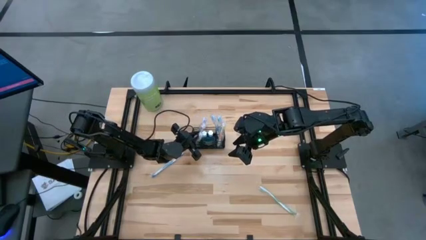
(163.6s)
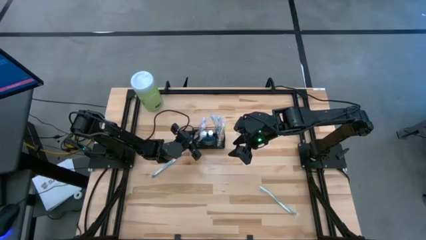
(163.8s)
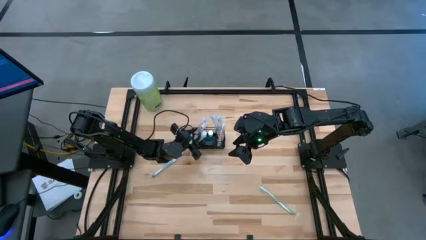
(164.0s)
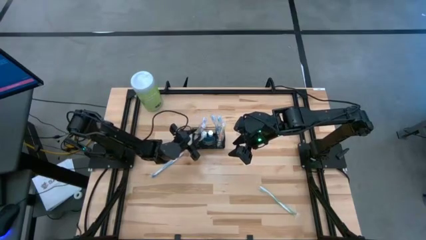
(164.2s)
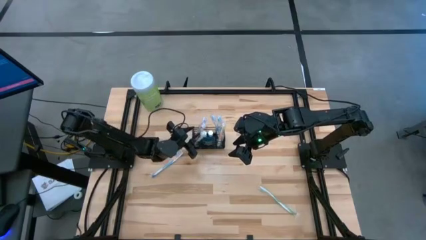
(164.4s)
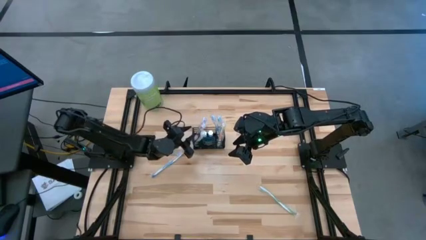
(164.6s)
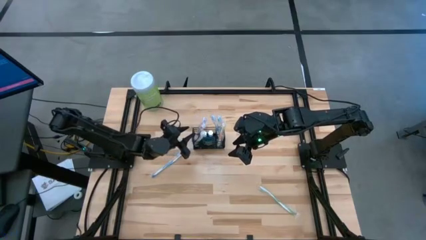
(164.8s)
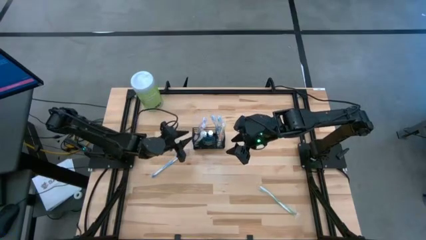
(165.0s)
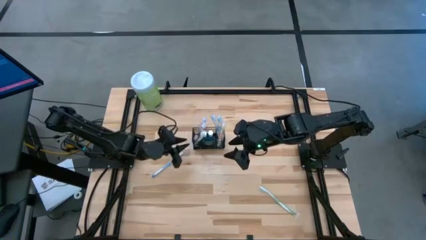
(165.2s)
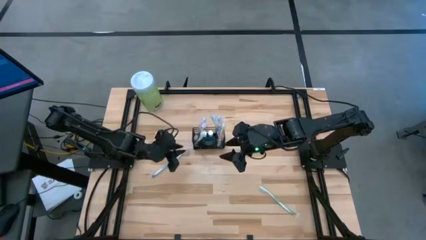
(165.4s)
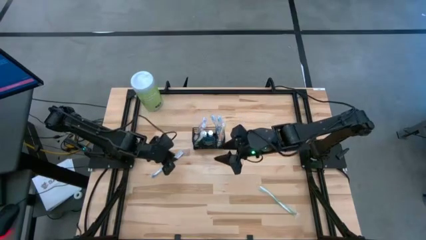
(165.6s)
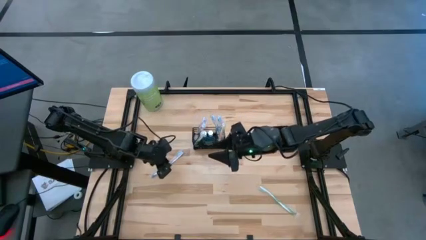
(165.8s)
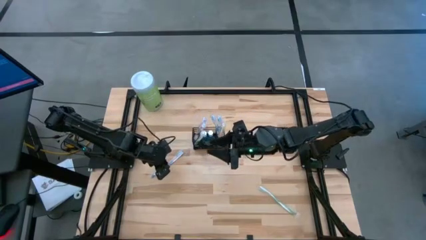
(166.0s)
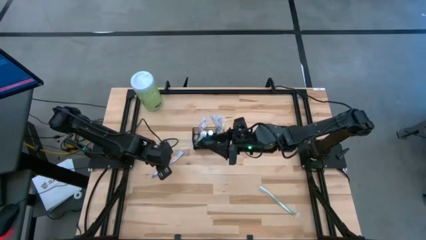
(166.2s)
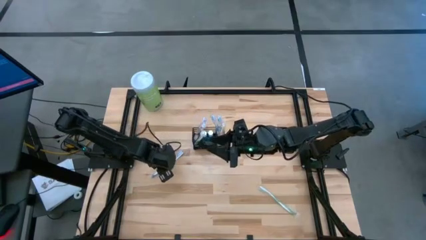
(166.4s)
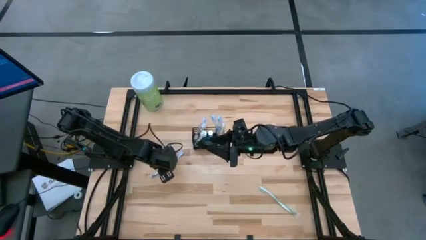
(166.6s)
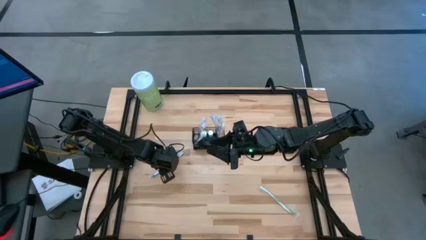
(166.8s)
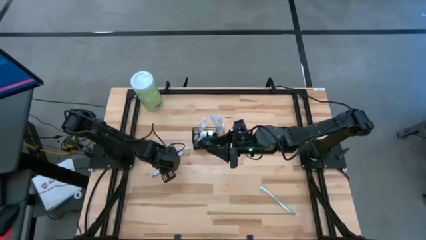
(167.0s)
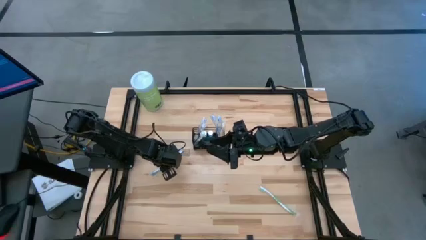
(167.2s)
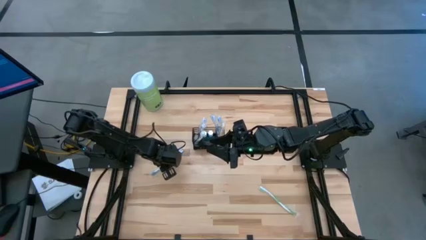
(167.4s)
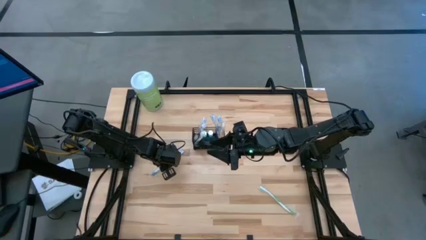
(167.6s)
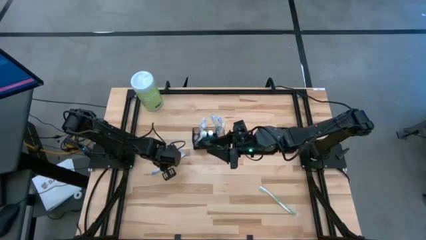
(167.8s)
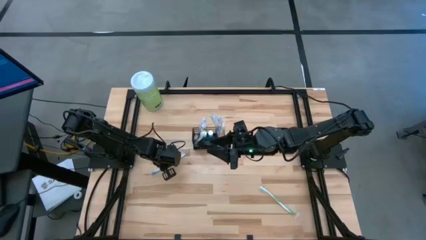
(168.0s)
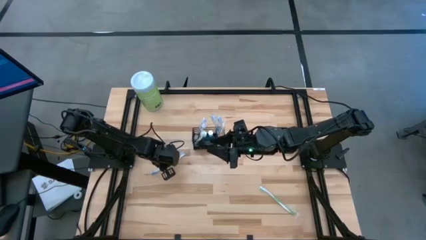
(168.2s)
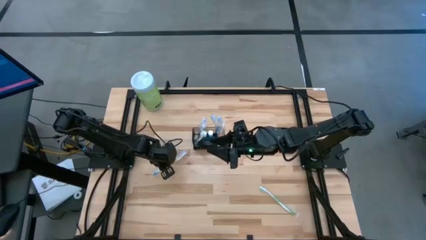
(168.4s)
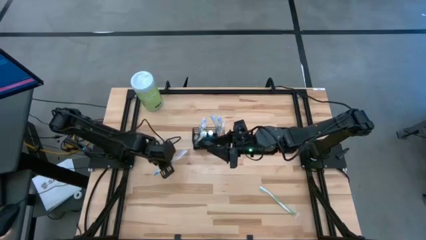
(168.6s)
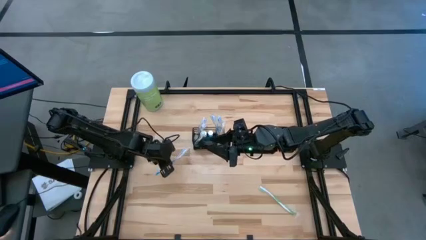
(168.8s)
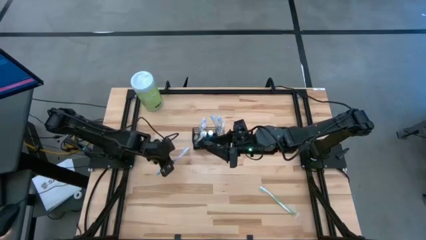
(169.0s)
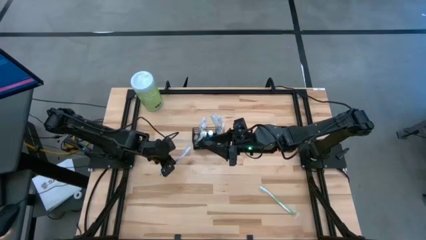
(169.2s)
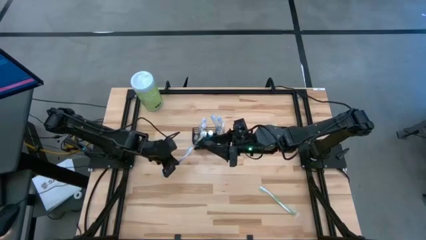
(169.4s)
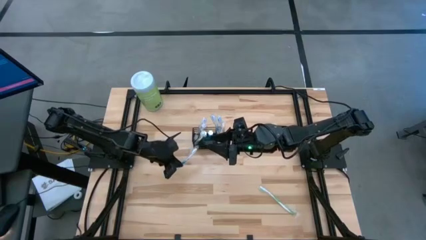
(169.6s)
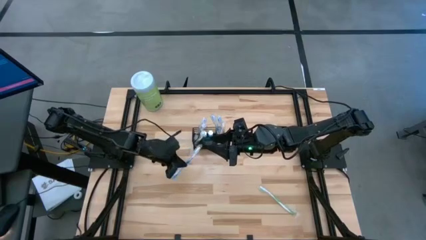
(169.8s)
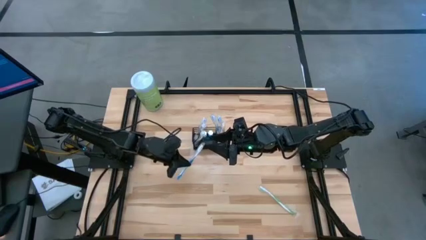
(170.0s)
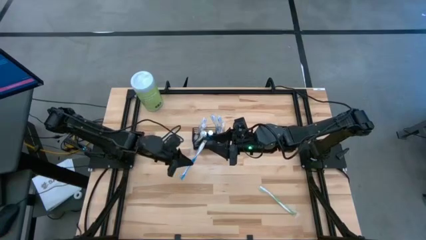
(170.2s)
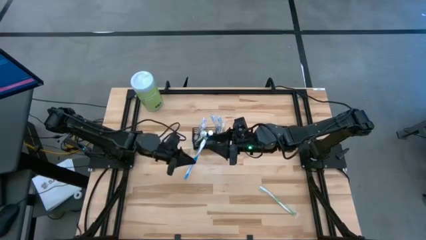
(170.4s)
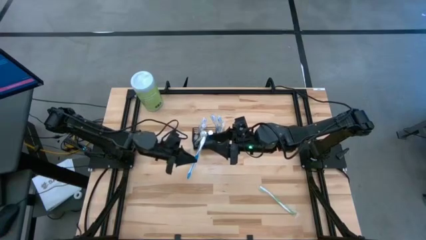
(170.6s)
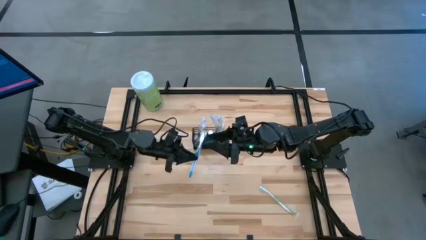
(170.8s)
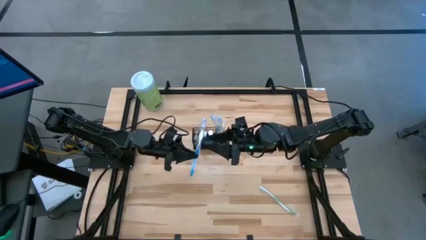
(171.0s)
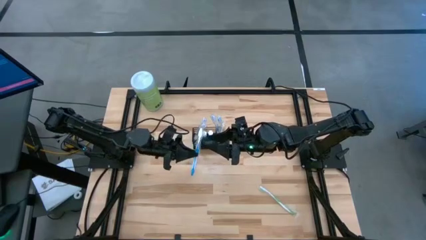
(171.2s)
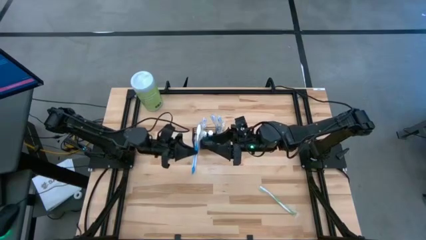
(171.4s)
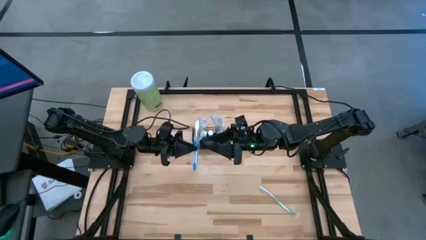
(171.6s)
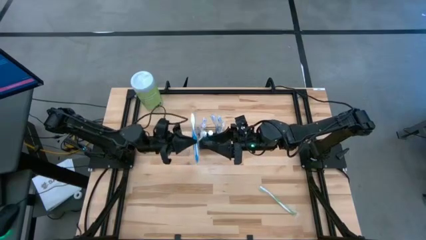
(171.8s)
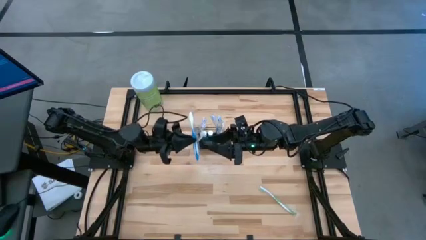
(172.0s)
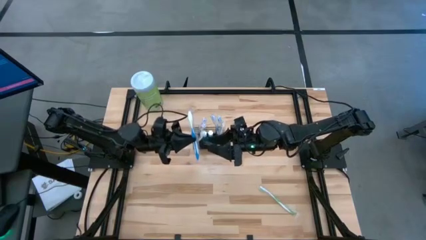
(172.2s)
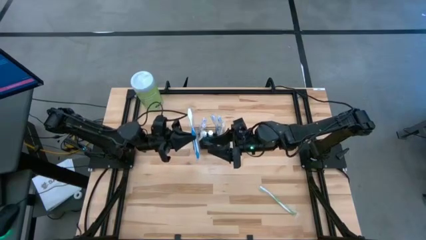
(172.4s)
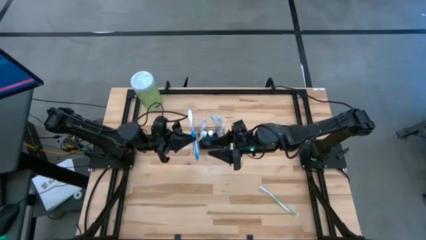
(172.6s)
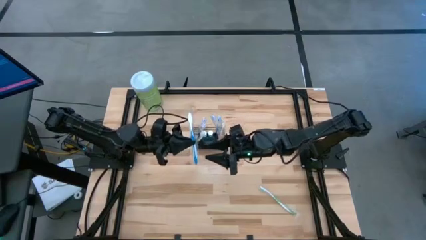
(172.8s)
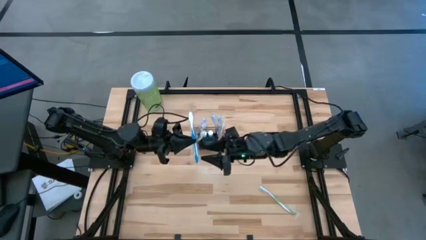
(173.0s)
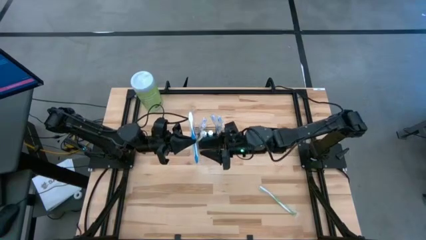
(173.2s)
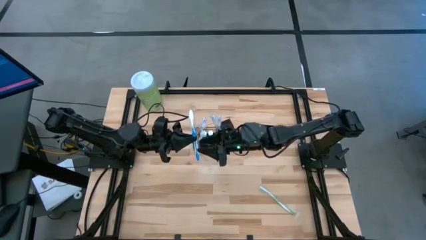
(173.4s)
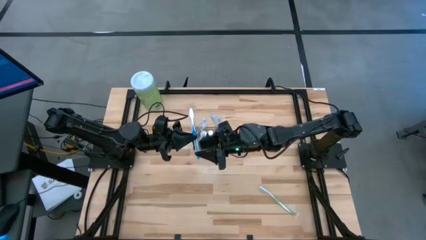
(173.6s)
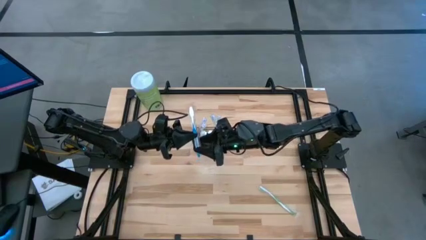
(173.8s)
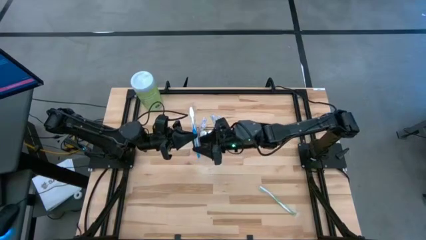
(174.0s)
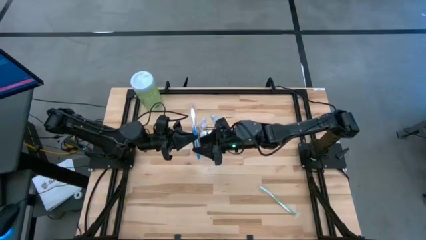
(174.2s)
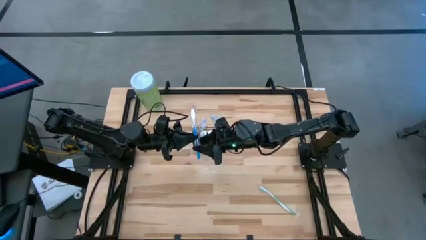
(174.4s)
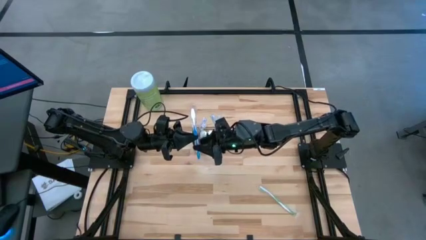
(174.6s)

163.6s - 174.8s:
Task: Pick & Place toothbrushing station
Put the blue toothbrush into the black mesh organizer

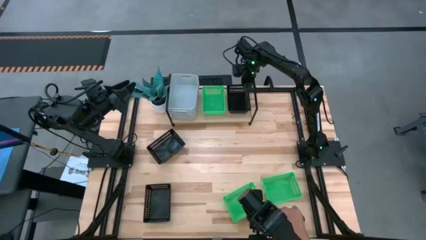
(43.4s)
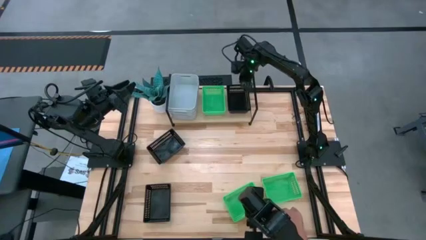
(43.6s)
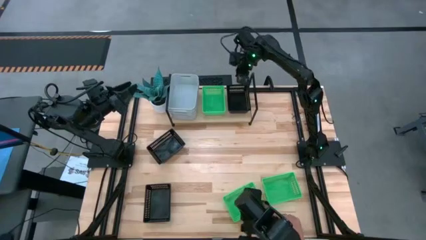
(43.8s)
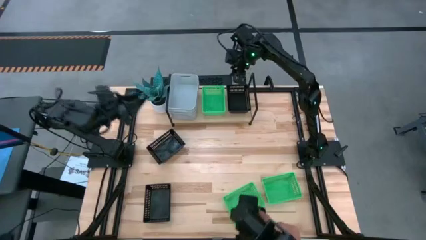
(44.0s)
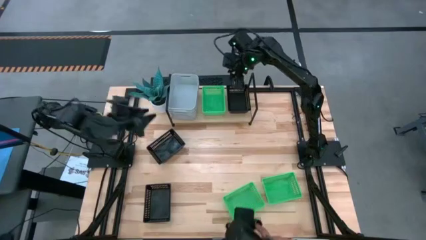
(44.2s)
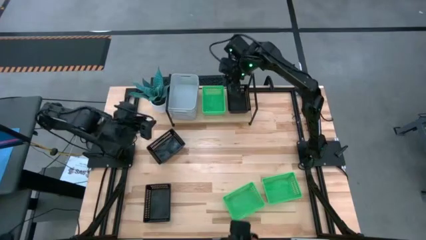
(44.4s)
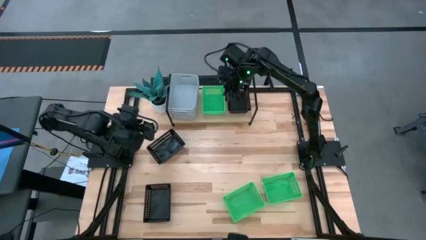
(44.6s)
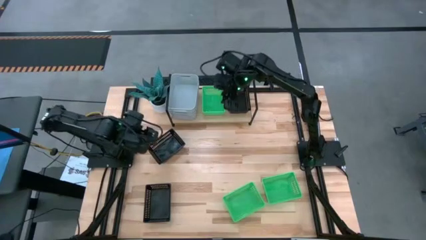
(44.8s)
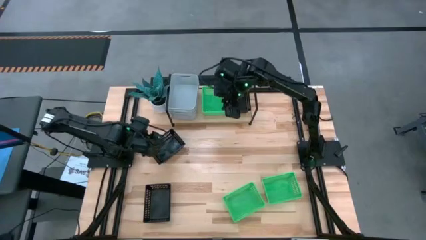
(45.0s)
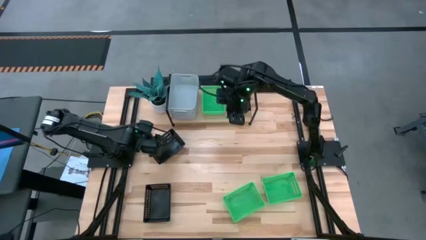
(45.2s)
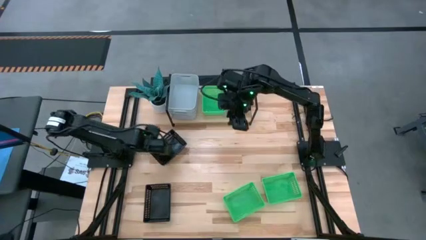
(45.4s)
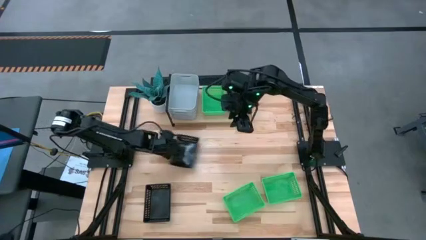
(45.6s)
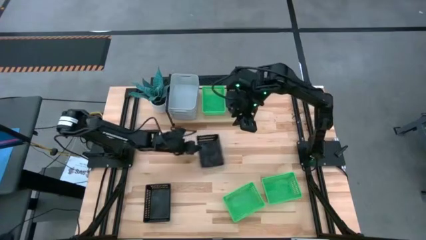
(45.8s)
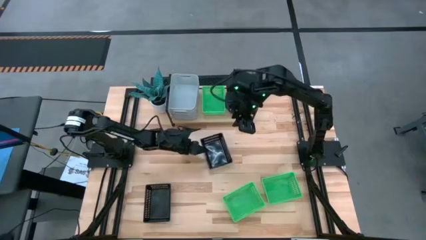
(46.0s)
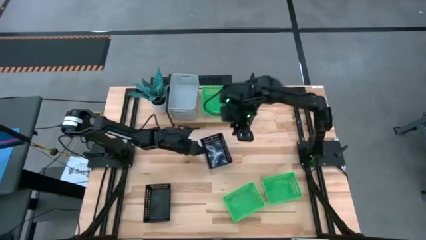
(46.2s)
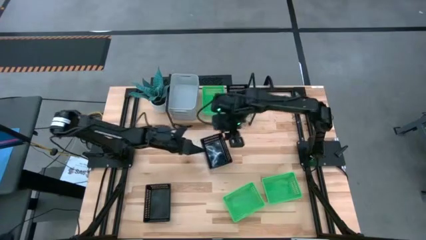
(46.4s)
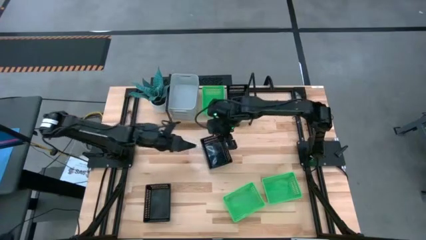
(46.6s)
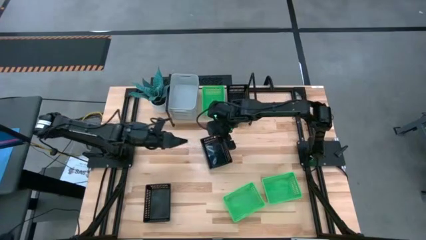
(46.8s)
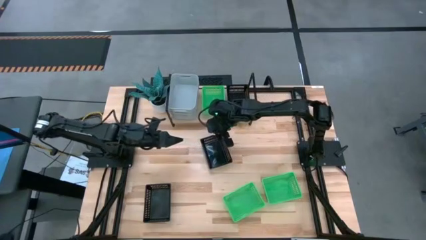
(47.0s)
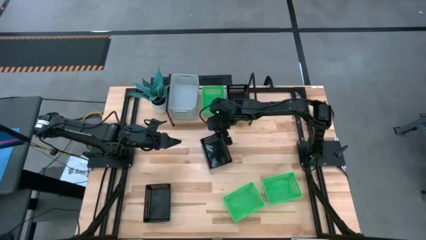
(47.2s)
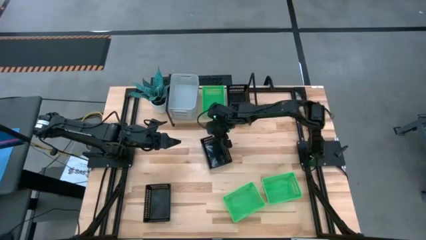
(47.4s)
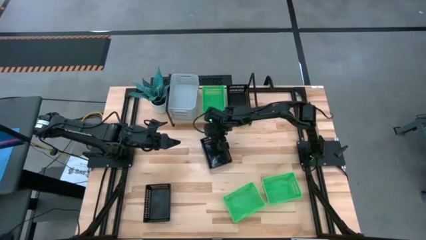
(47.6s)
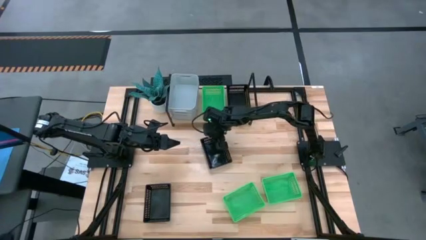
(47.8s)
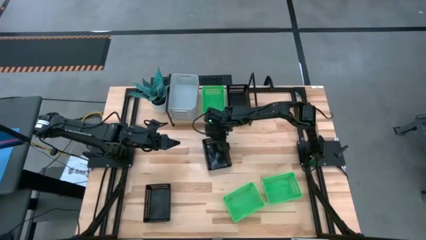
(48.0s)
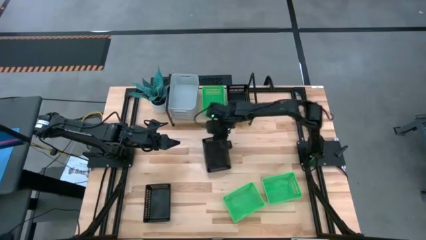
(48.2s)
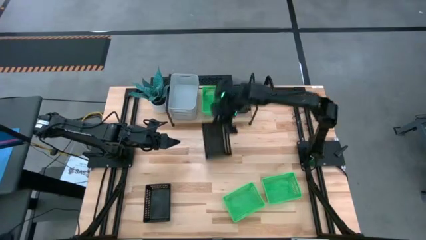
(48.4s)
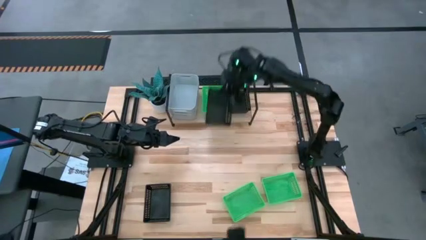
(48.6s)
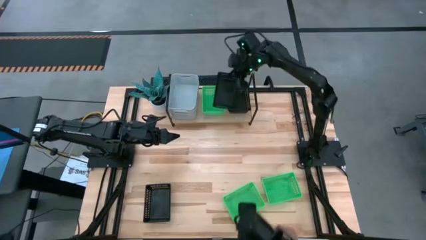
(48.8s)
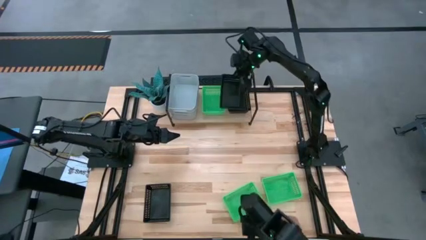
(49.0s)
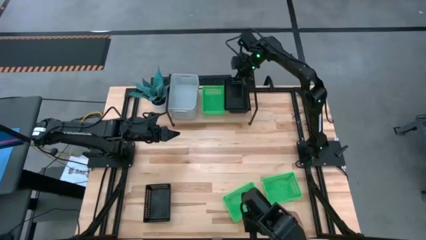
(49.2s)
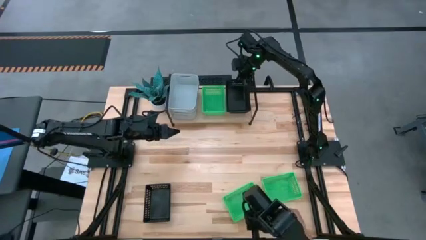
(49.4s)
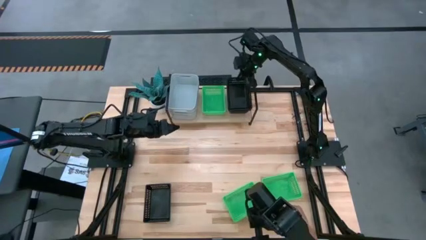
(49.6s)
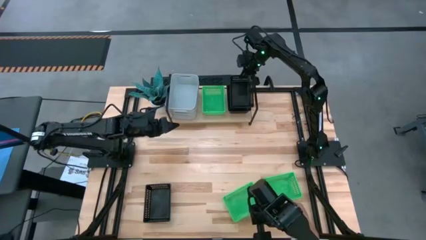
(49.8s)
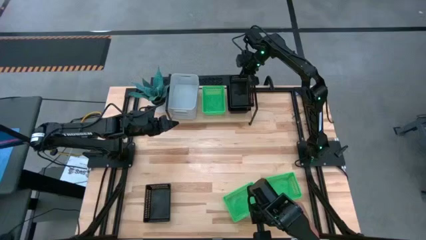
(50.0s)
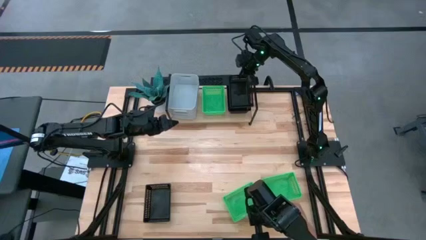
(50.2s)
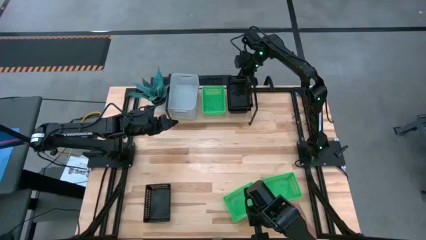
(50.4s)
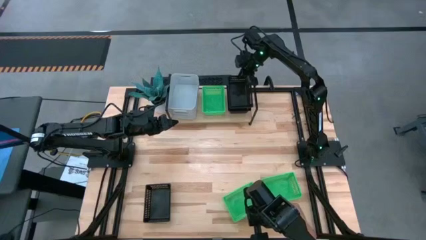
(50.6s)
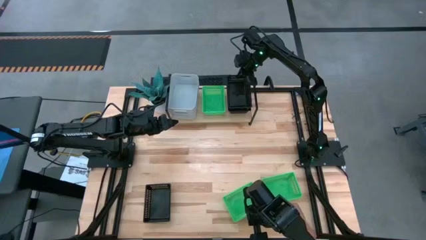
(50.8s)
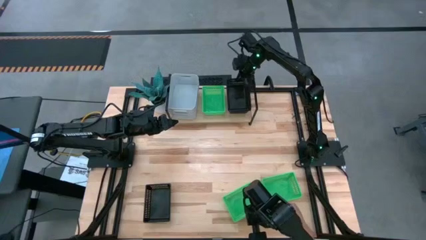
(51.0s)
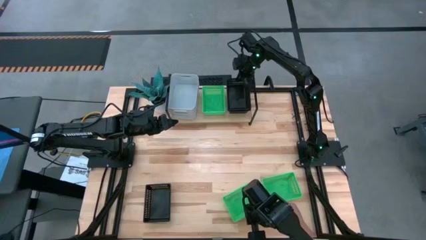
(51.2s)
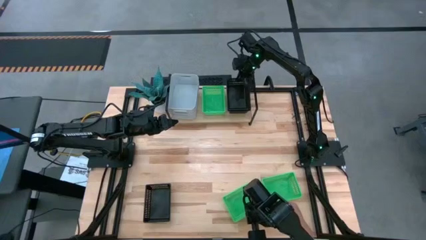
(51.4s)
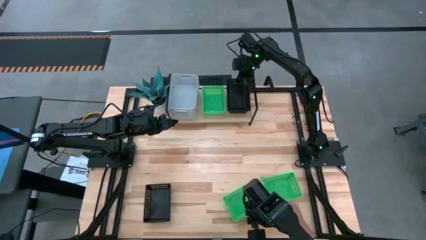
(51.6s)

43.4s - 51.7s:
Task: Stack baskets on shelf by color
Stack the top black bin on the black bin on the shelf
